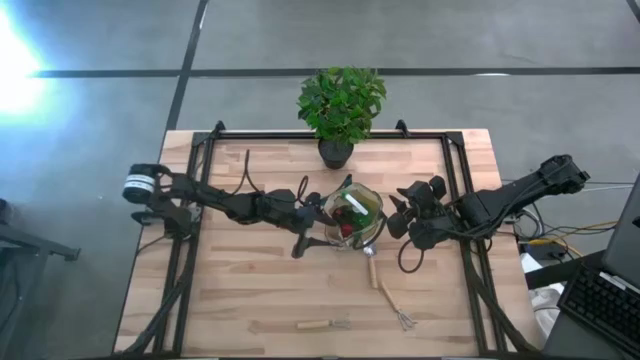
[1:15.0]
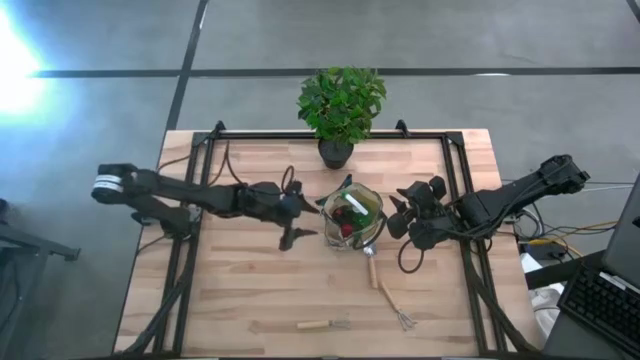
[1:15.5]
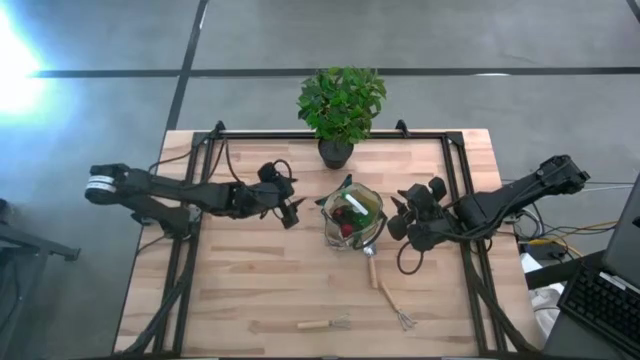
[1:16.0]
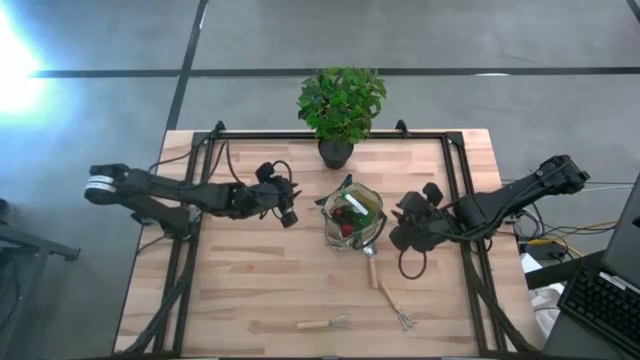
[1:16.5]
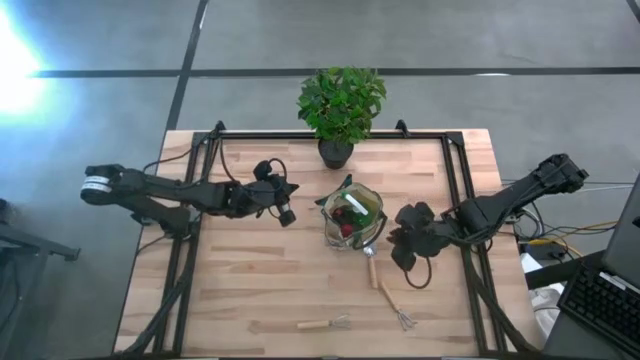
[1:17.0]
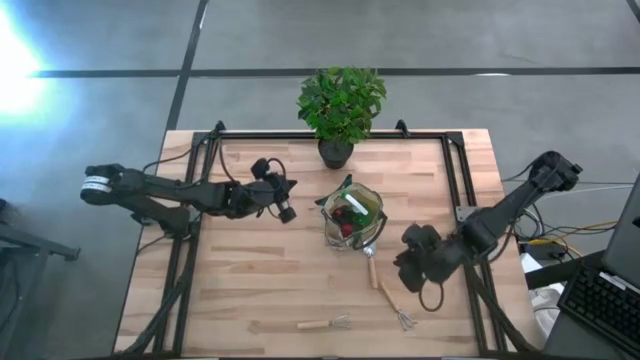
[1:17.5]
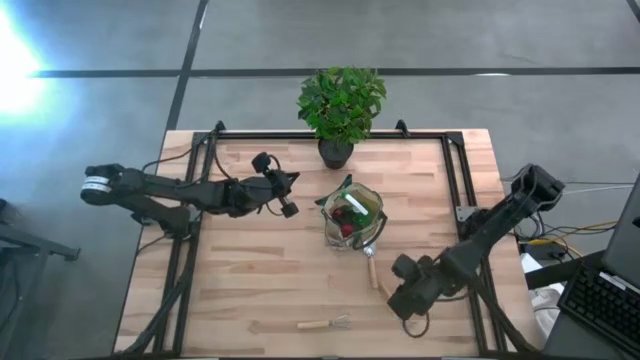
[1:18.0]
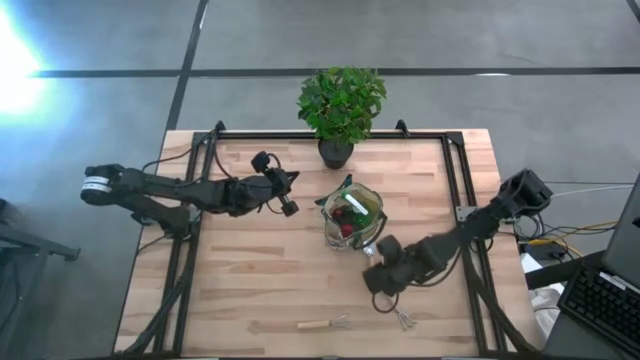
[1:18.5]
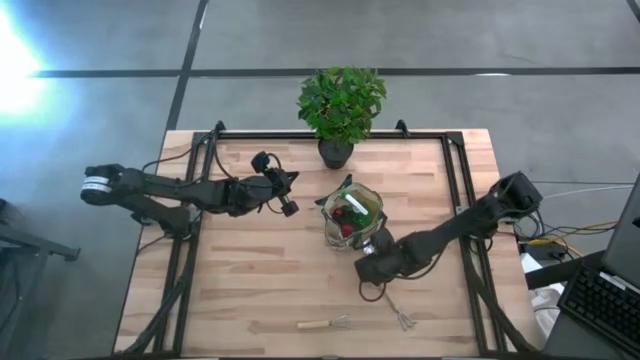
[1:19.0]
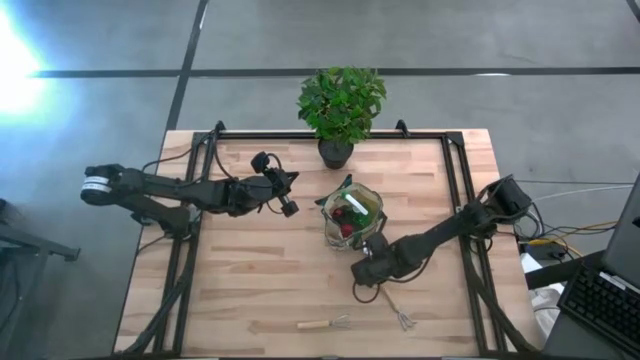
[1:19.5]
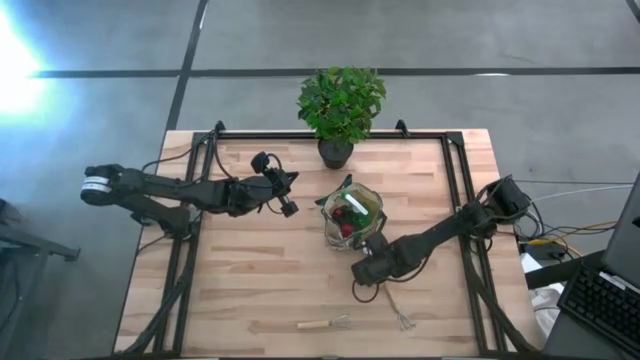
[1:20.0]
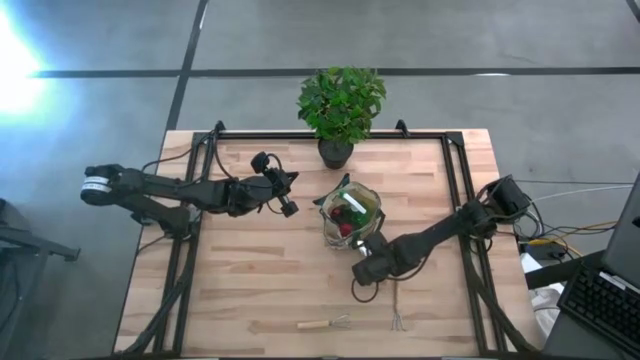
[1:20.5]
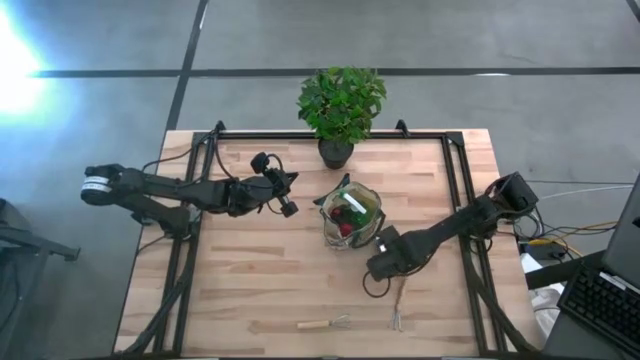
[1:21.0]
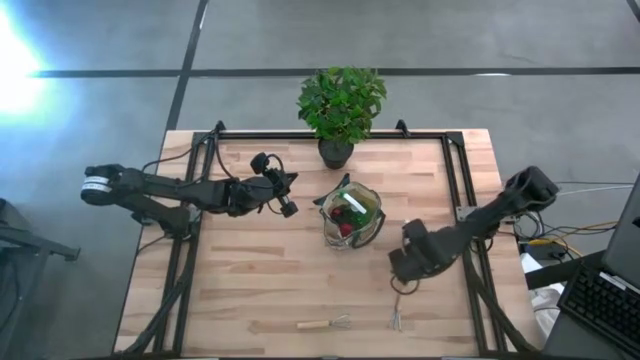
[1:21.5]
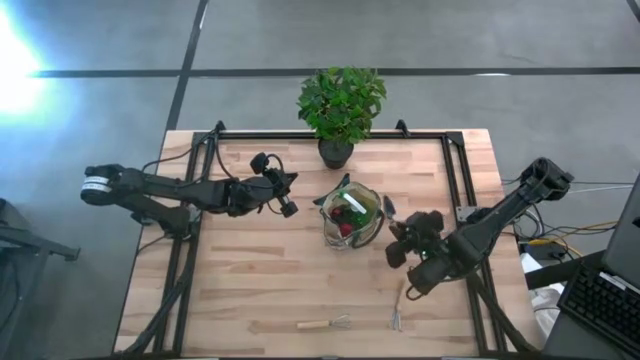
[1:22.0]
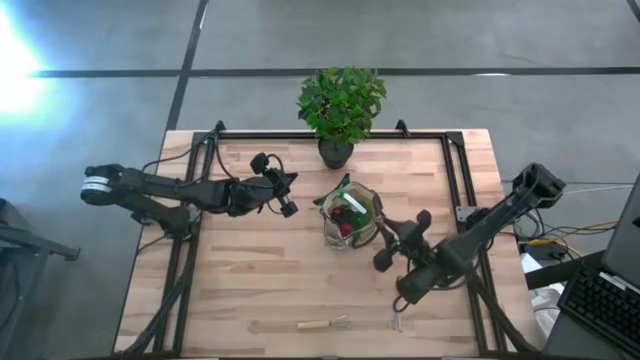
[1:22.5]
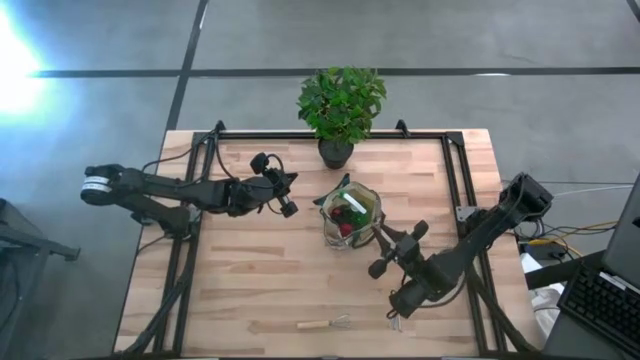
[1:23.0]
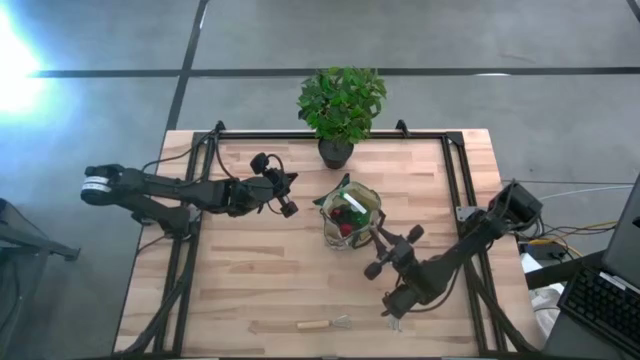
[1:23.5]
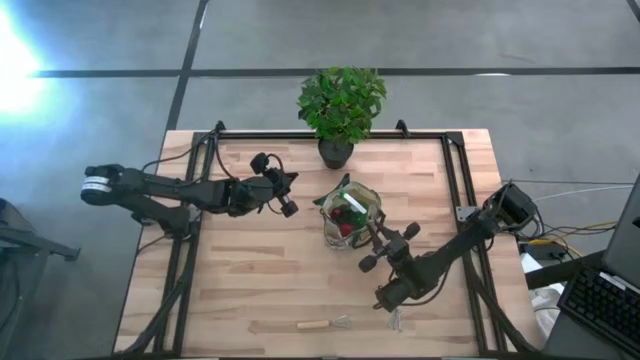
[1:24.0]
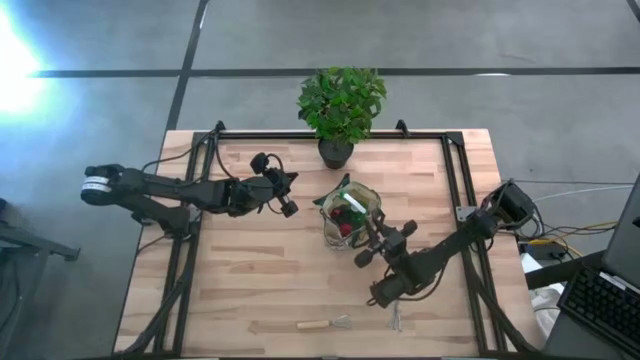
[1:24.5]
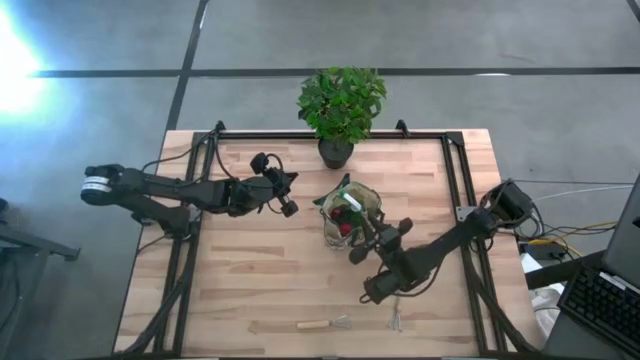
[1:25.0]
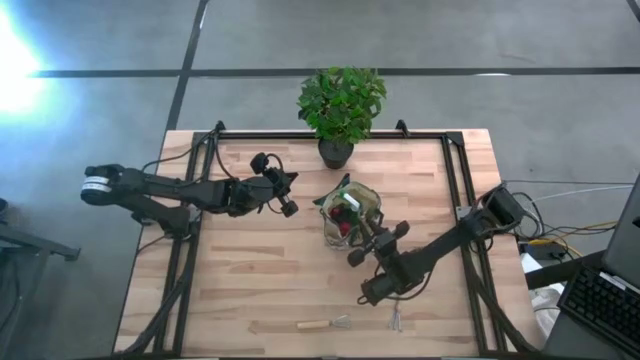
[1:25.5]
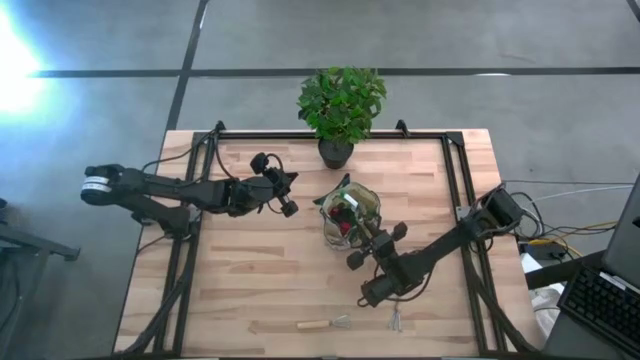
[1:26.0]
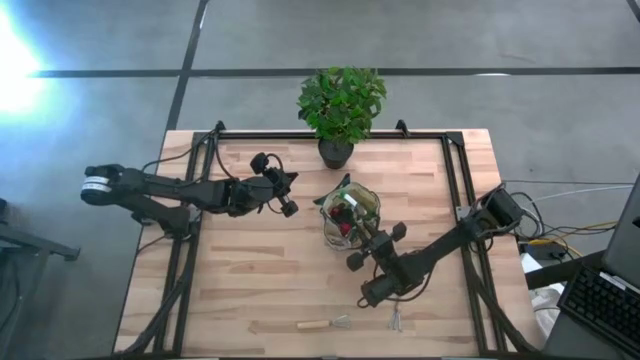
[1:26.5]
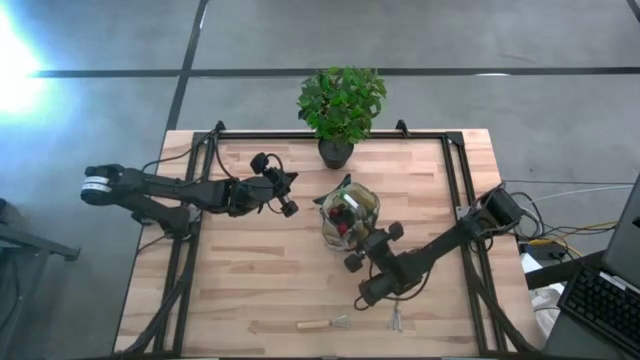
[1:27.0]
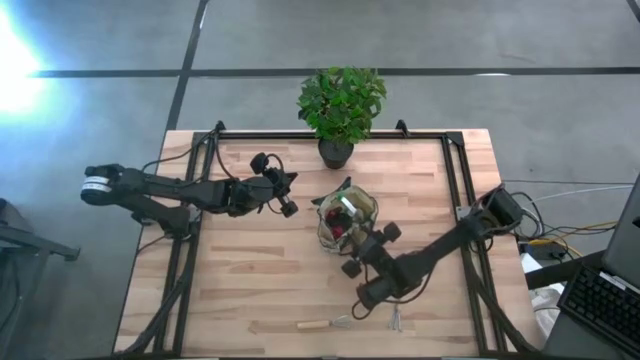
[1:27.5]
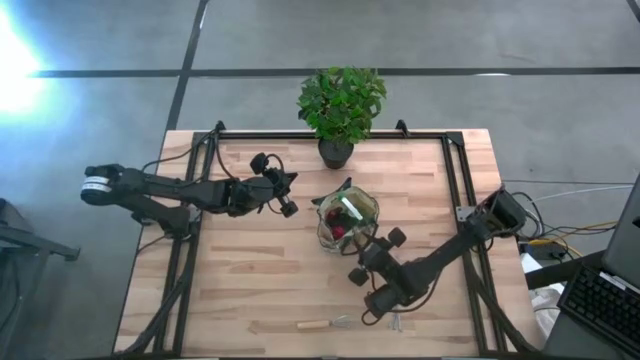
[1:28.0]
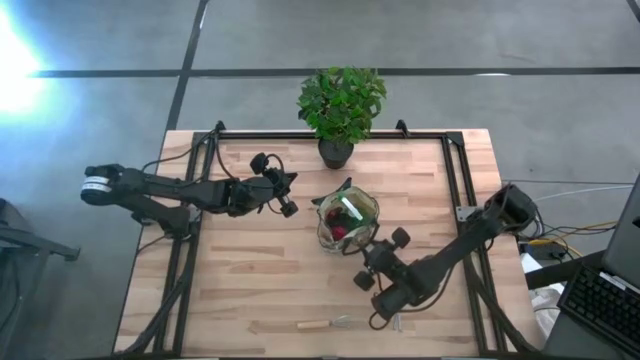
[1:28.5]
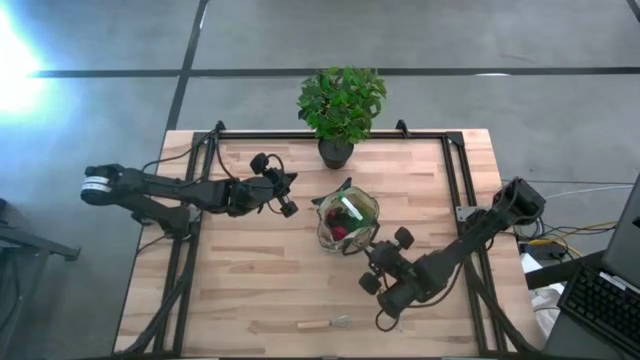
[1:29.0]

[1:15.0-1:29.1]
Task: Pick & Place Garden tools in Gardening bag
Put the brown trowel into the side pocket of the gardening bag

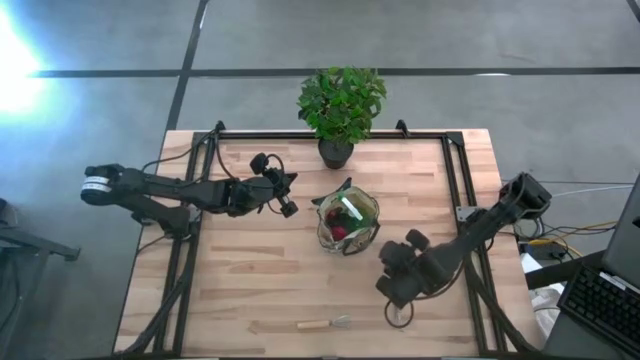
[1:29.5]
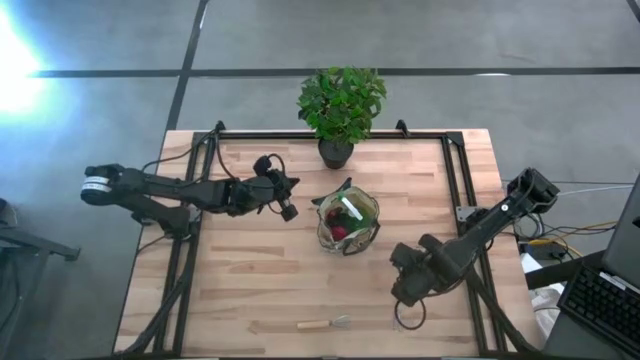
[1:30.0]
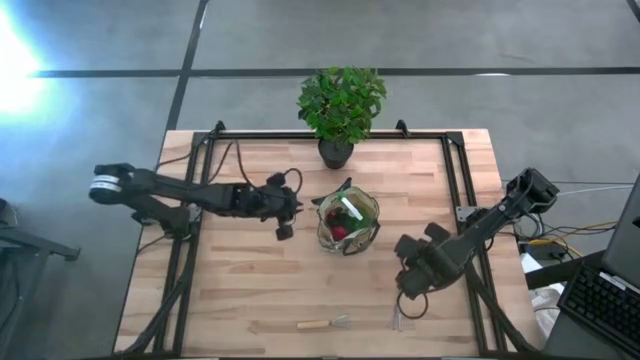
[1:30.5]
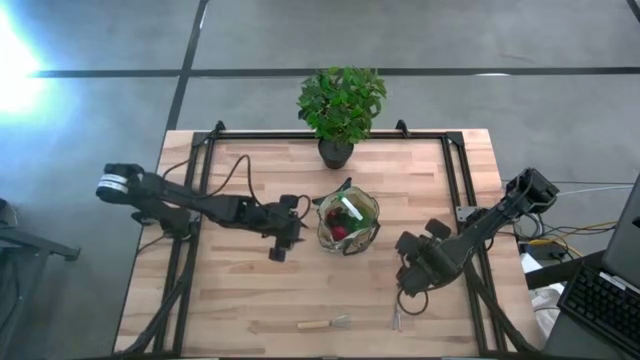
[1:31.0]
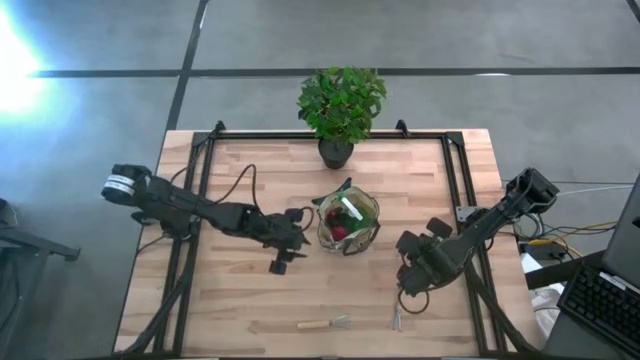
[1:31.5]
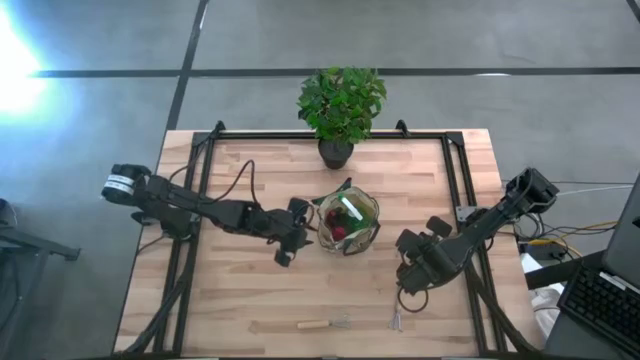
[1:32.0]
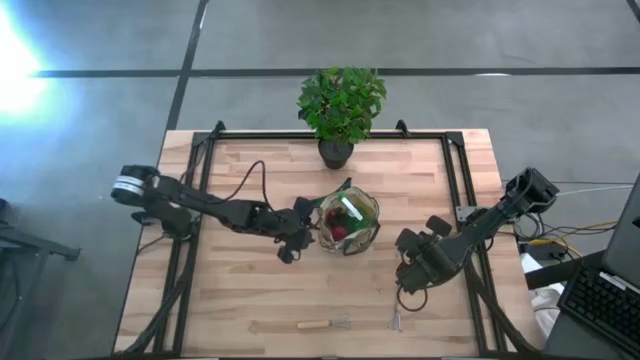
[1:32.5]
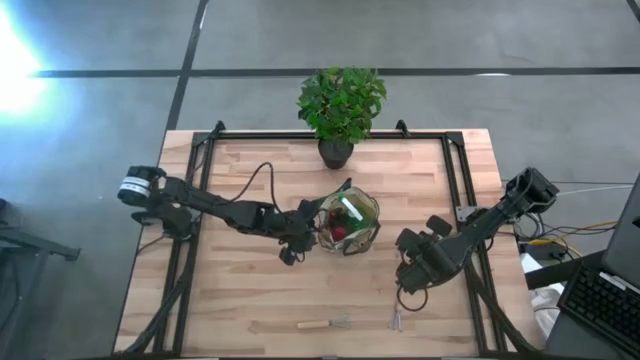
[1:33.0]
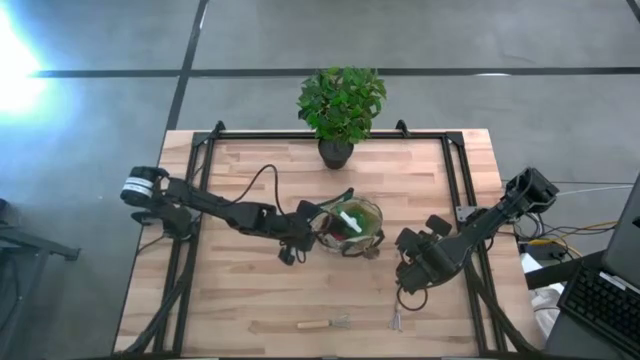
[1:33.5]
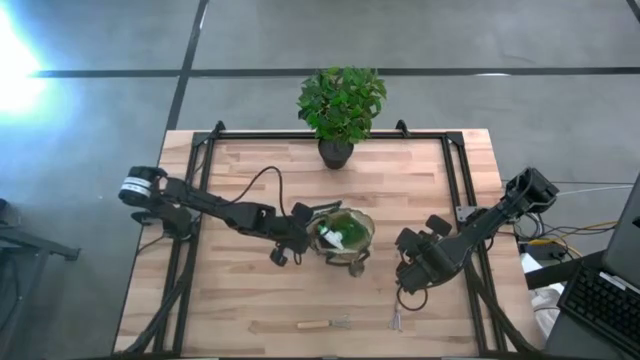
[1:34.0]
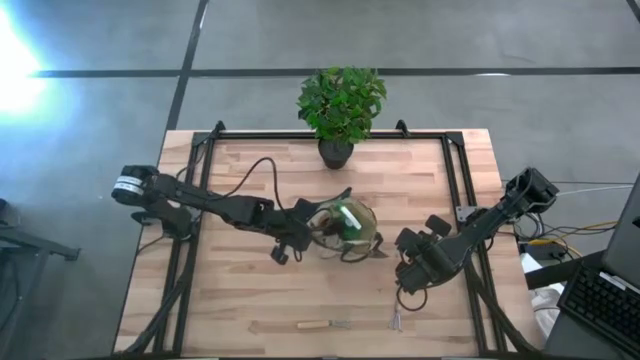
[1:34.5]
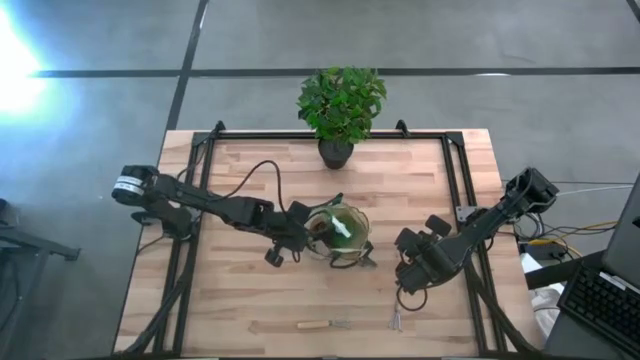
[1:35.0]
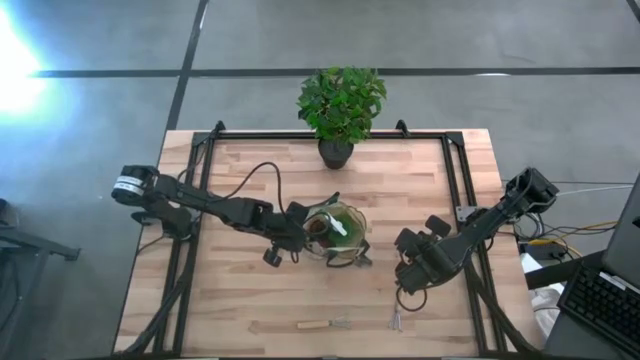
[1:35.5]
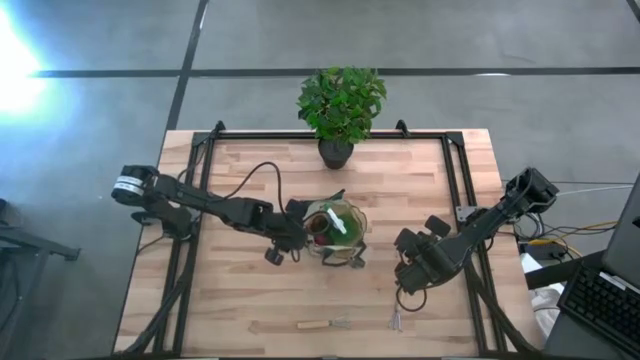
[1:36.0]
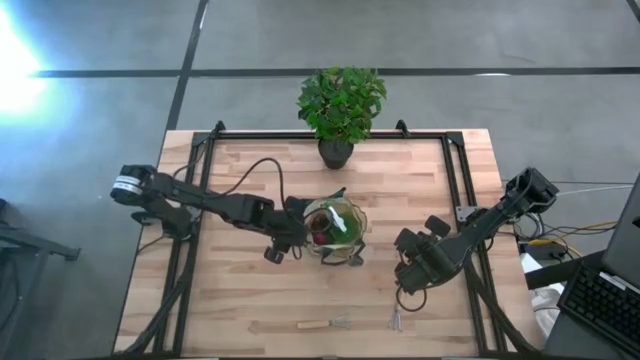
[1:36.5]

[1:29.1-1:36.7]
Adjust the gardening bag on the table
